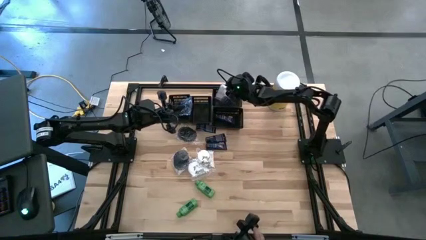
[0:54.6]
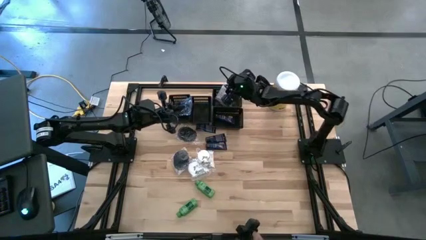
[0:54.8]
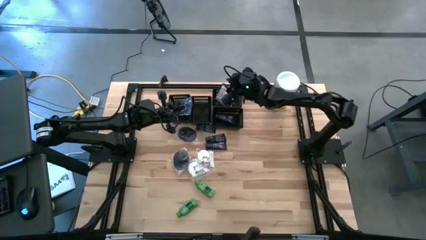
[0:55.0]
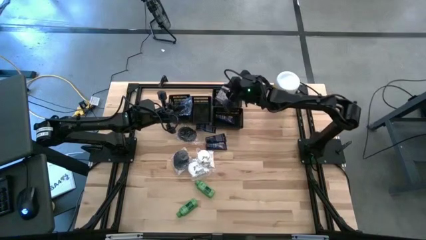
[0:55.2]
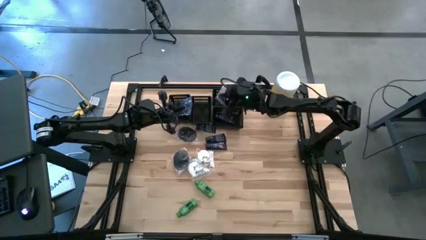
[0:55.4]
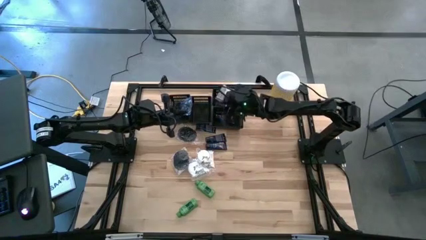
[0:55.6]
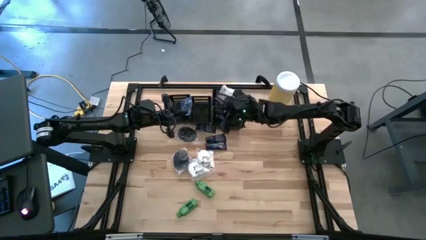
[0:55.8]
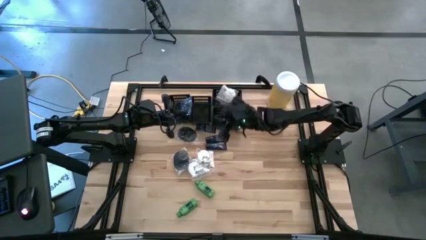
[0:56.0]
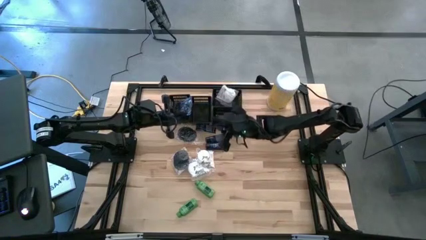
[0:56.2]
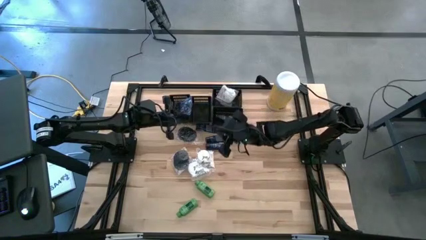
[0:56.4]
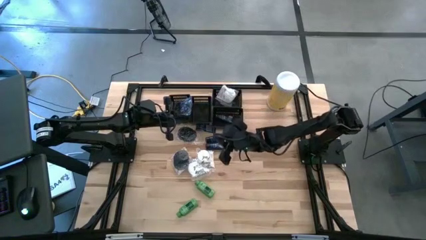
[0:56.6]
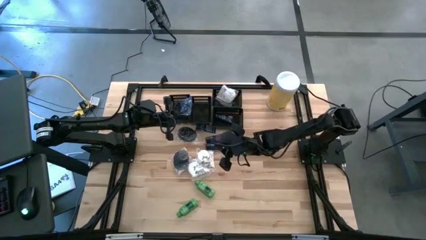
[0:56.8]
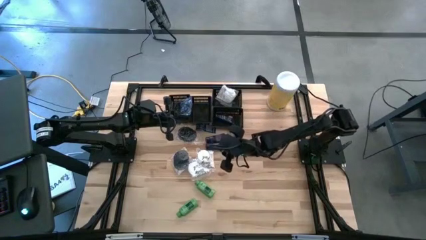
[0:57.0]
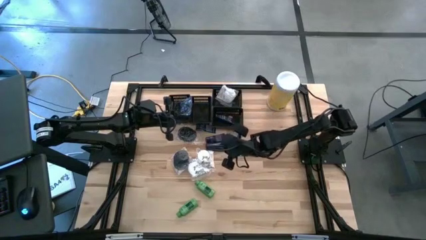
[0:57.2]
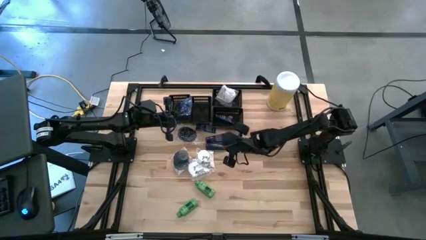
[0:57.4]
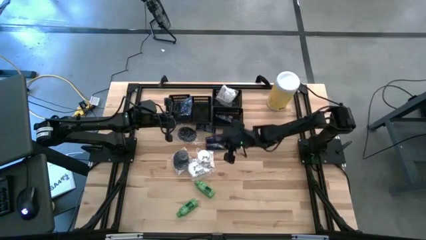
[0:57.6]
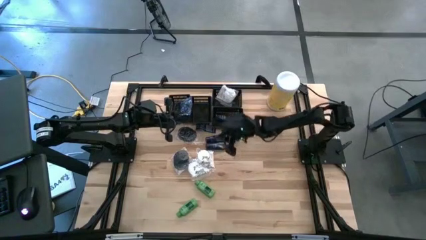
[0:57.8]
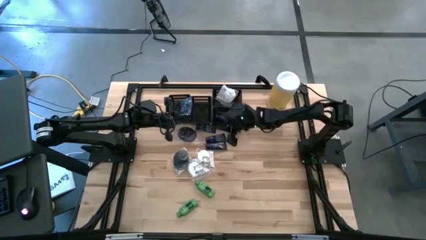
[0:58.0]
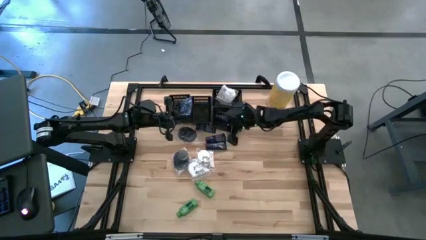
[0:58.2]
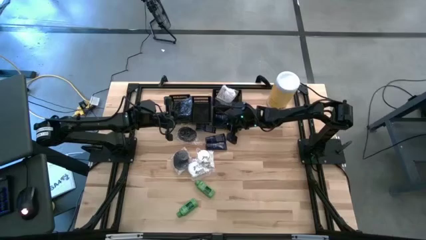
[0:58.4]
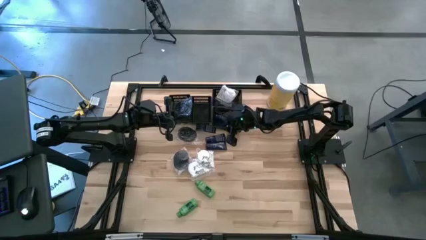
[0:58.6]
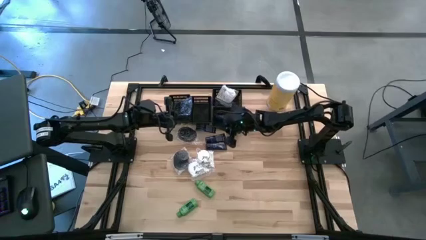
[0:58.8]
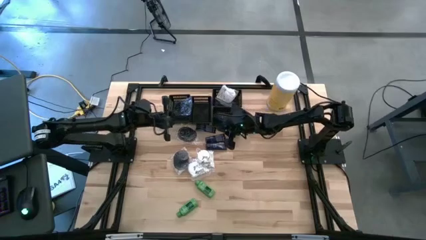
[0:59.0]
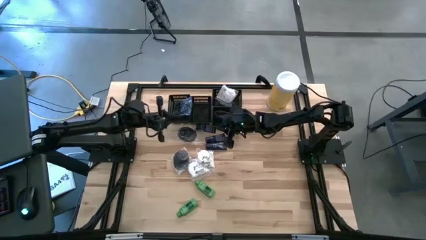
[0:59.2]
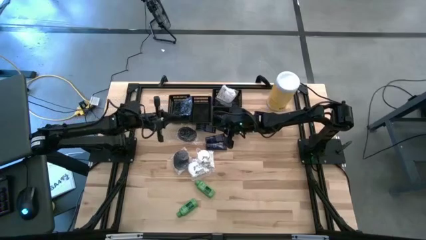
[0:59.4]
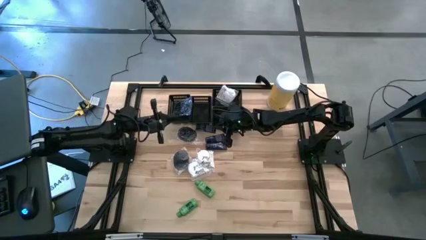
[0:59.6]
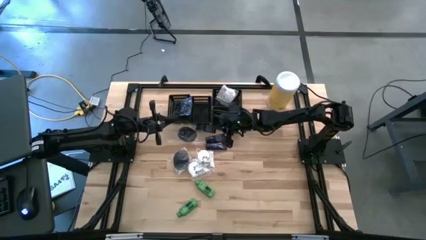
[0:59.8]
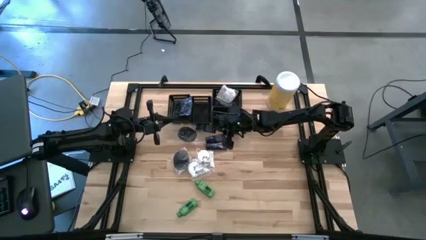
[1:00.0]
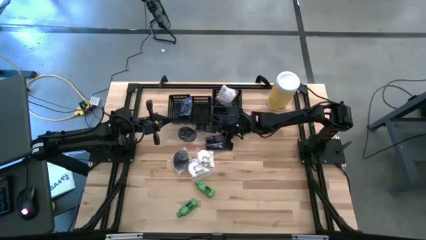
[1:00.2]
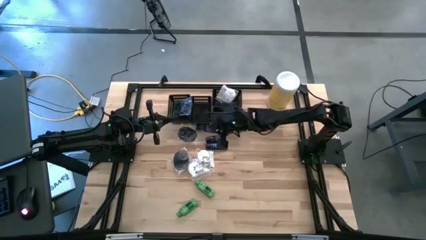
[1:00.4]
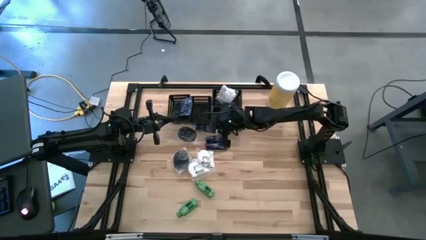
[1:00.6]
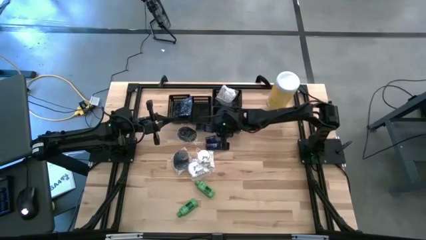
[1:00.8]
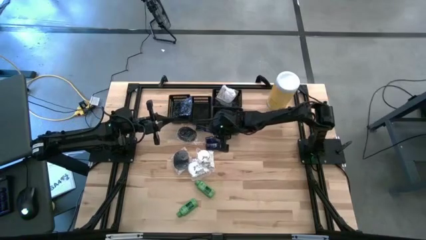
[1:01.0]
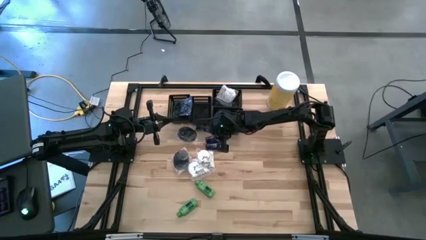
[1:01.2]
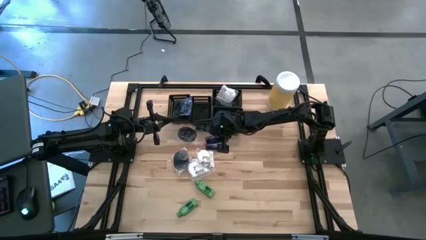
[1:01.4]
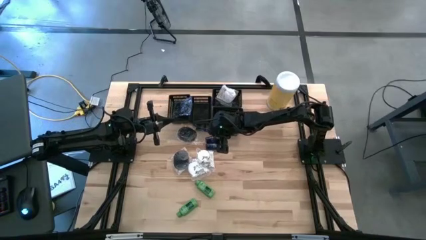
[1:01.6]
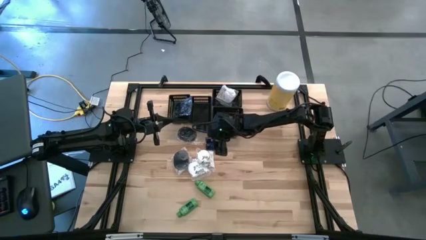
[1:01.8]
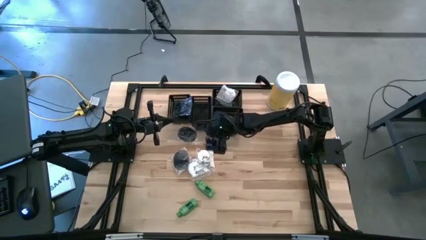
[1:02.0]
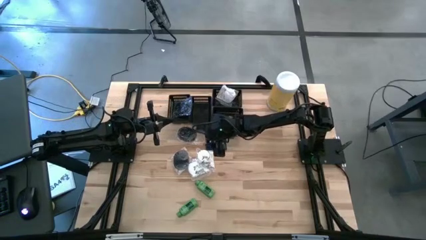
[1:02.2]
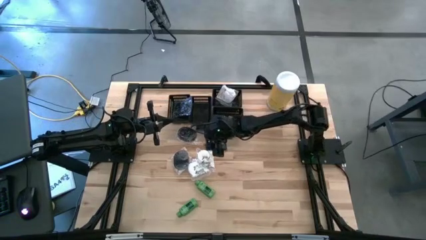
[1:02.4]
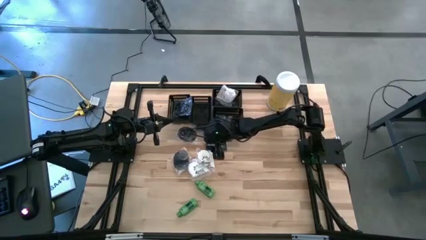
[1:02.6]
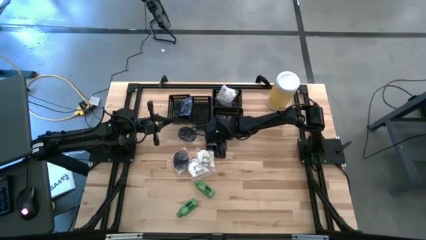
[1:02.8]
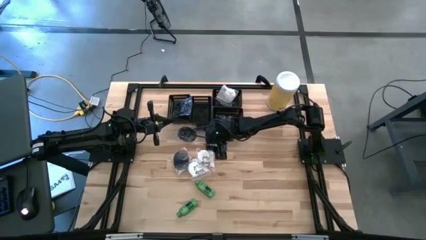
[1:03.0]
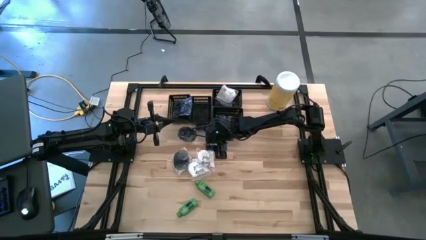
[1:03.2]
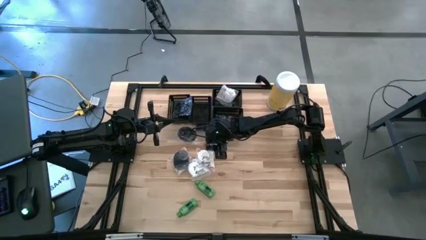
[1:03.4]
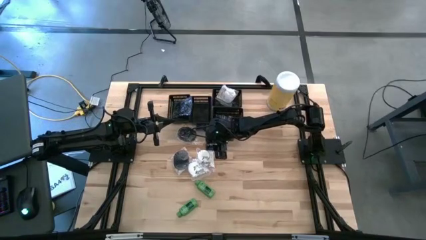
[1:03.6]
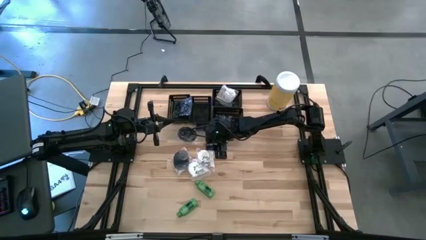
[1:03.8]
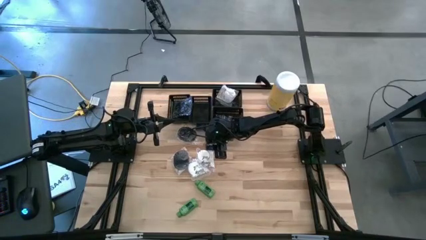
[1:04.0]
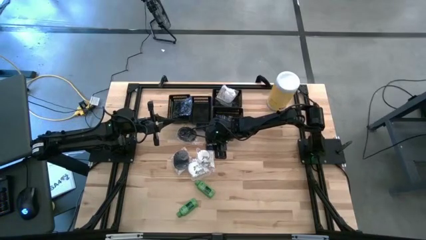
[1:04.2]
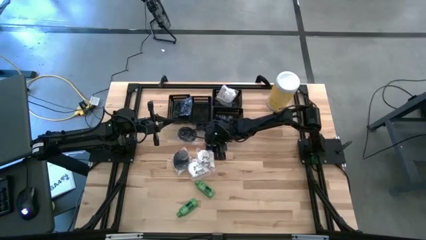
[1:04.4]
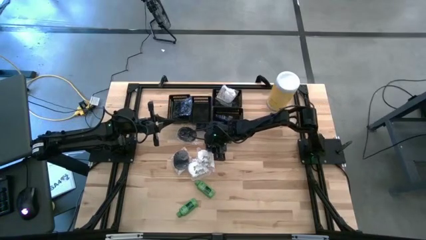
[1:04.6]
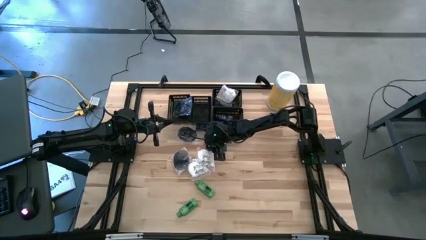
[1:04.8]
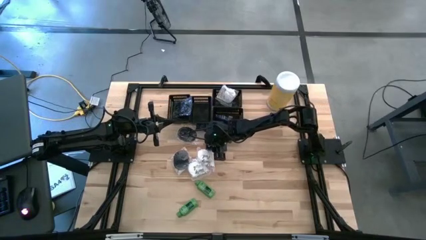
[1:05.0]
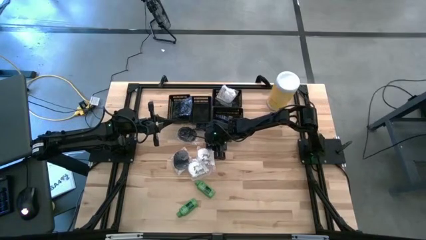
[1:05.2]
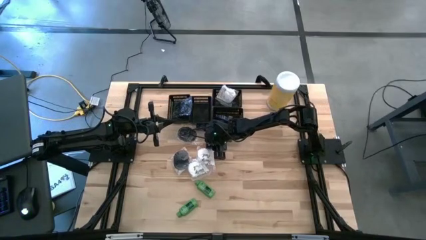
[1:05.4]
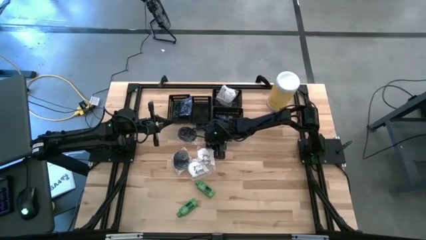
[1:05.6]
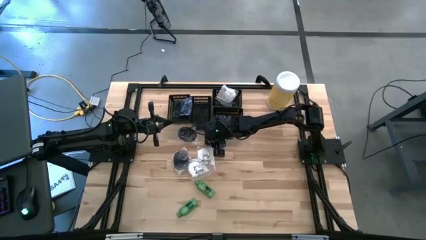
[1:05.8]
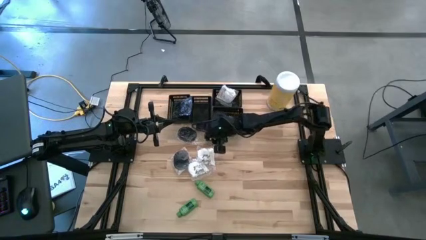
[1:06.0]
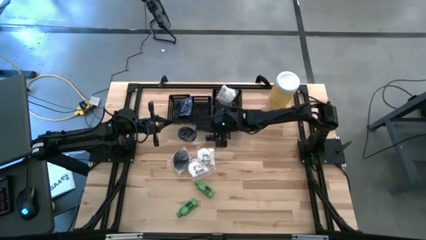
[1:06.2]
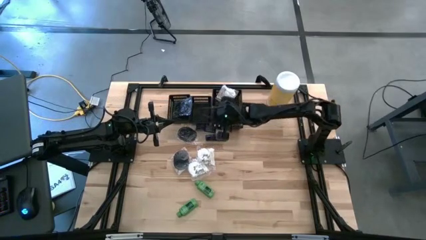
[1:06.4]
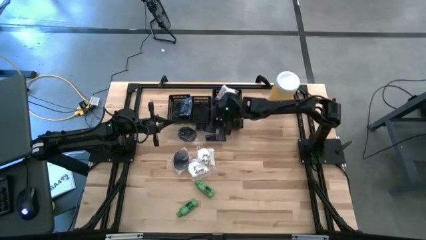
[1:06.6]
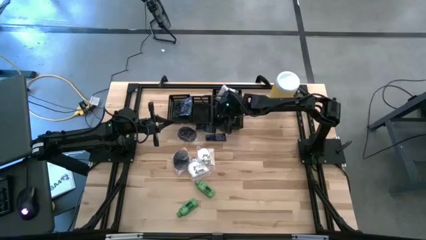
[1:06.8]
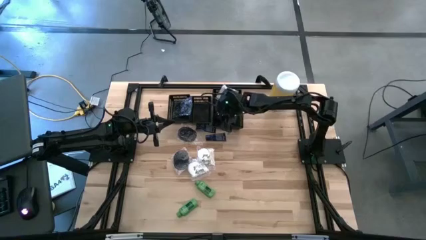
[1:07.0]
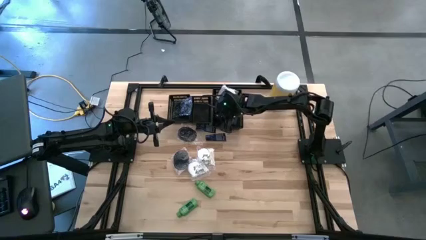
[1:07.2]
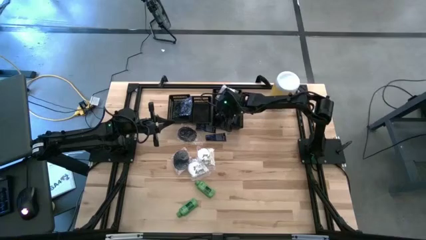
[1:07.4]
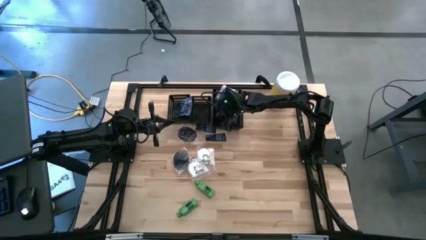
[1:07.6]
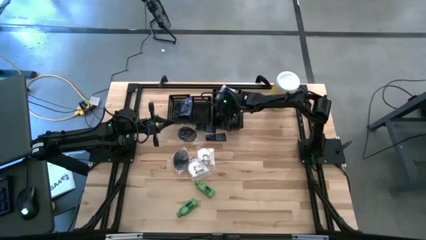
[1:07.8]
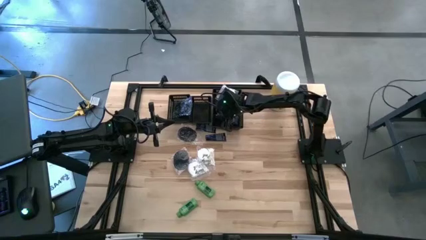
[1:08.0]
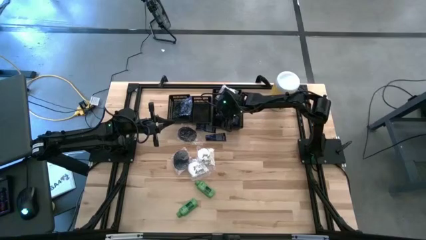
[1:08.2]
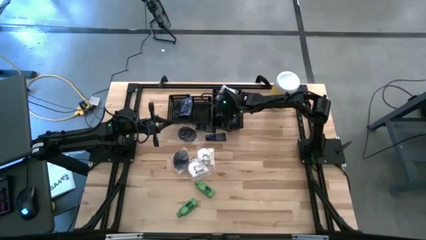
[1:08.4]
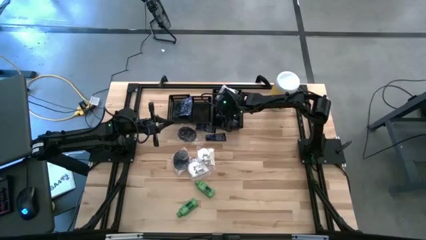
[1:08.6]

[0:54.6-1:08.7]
Task: Pick & Place Travel size toiletries
Put the blue shave cream into the bottom black bin
